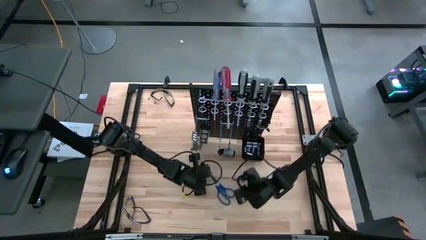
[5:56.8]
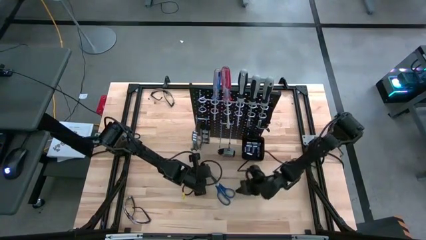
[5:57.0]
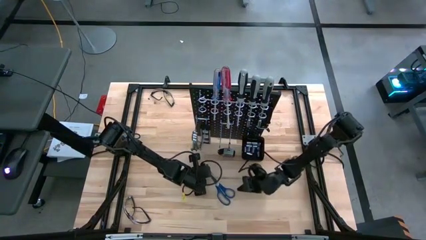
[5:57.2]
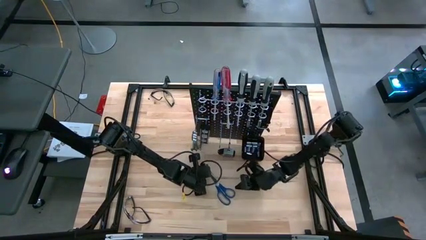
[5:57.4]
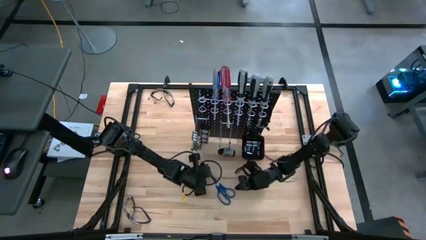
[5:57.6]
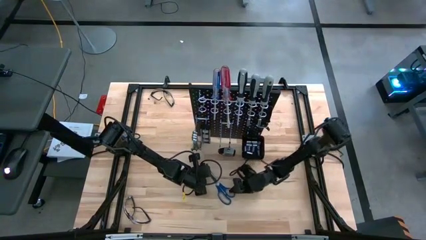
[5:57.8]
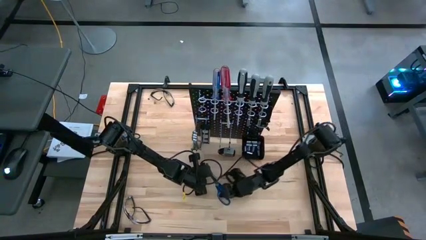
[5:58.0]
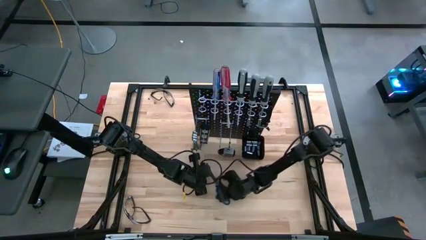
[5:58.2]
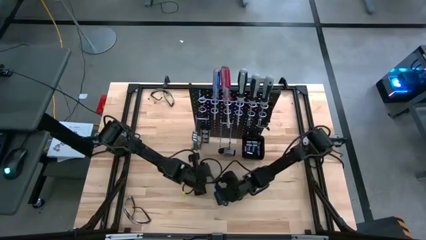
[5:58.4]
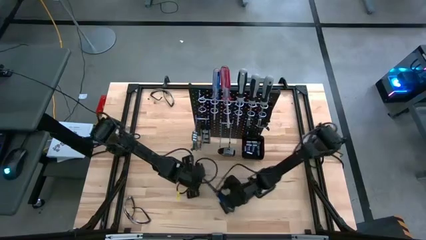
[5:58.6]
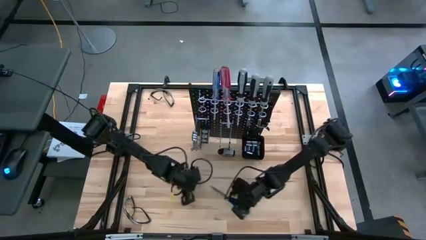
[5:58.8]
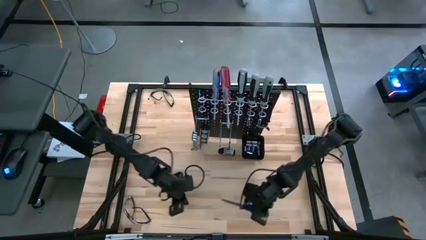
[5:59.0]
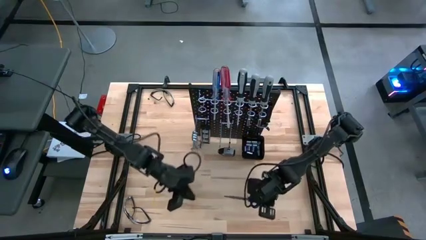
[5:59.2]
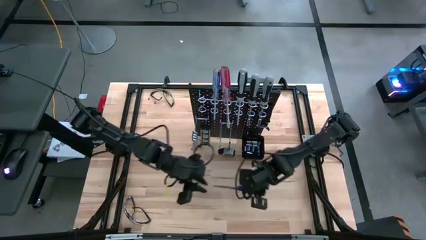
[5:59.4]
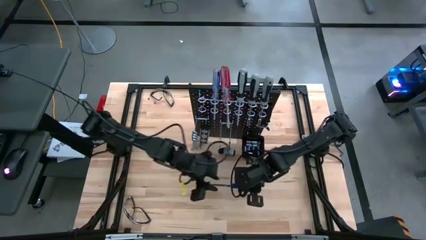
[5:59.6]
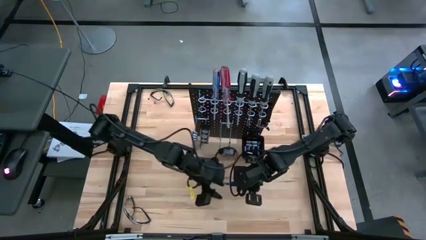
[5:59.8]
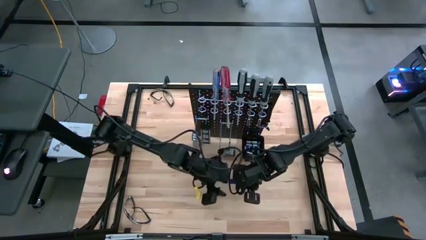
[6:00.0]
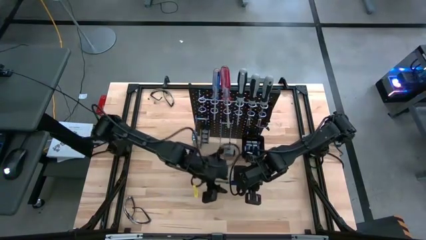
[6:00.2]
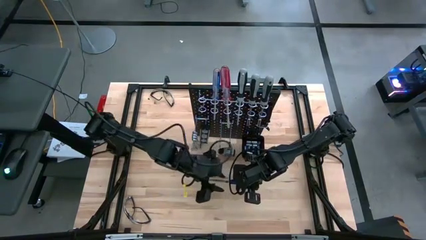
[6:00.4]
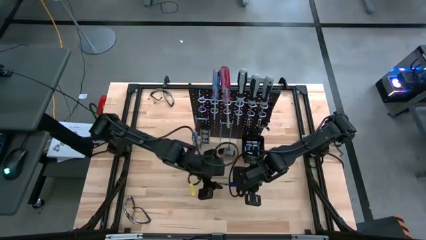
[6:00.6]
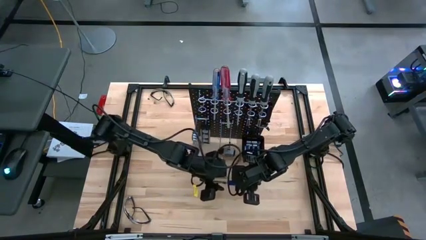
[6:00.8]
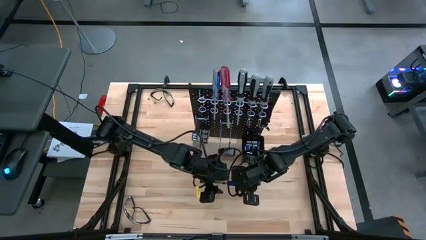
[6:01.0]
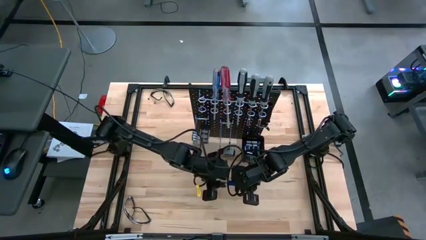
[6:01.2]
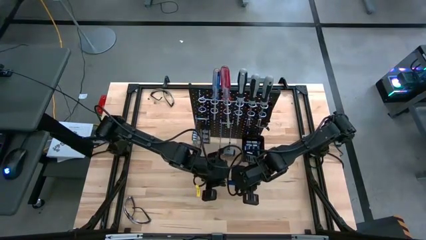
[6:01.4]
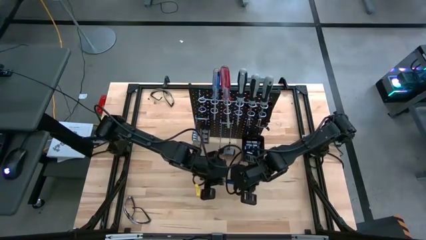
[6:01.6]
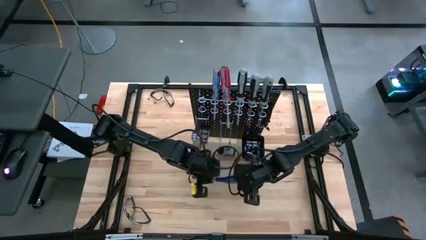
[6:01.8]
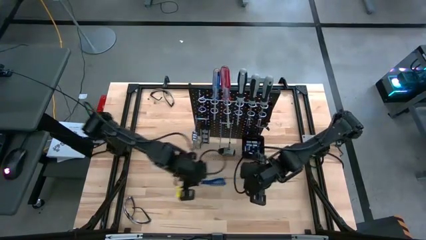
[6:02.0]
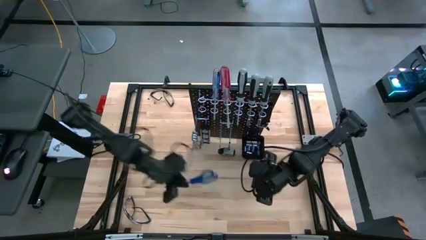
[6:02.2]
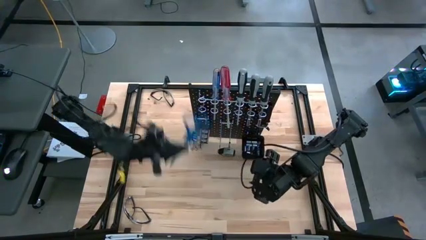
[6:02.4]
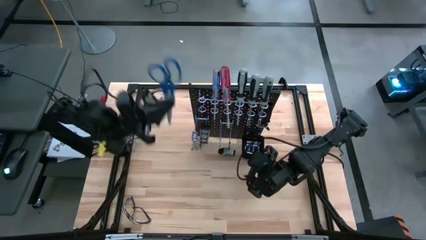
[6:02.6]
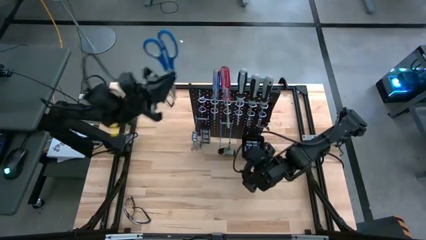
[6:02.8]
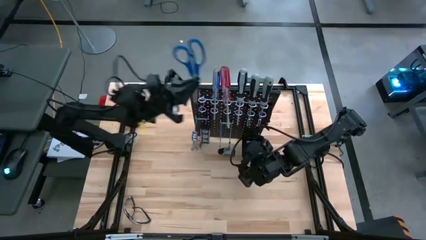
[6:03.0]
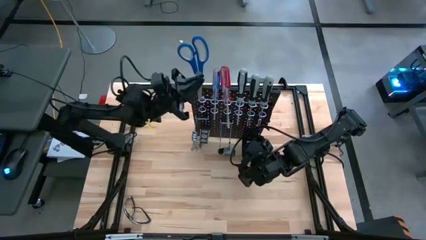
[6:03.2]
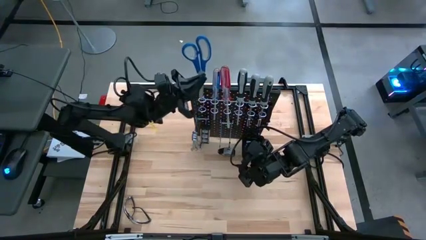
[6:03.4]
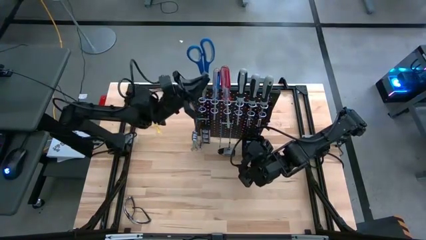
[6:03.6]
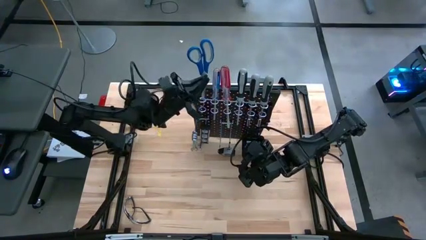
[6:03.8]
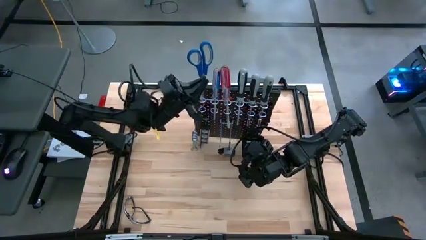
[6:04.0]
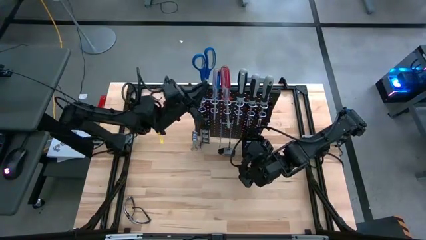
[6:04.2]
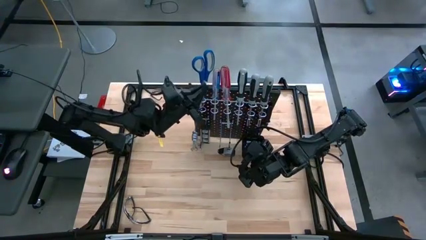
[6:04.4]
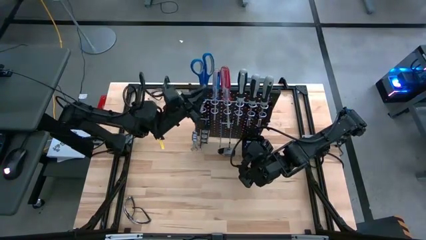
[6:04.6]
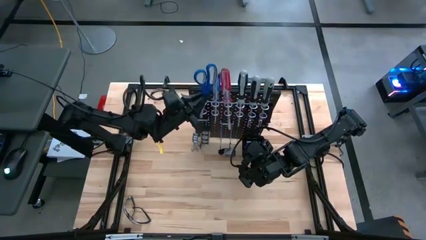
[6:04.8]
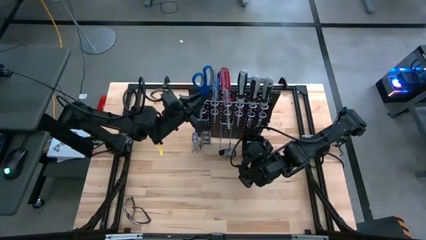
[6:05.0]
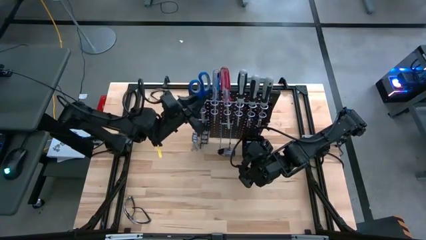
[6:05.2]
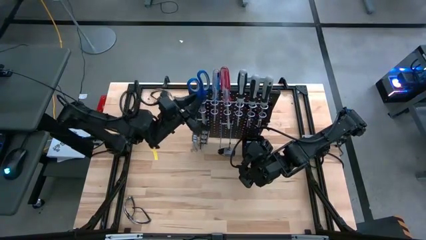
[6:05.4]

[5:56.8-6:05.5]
Task: Hang tools onto peg board
Hang the blue scissors on the pegboard

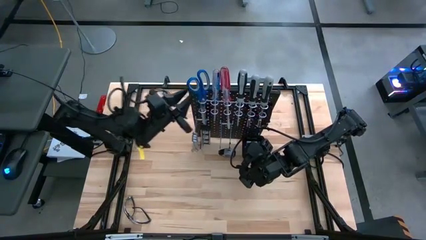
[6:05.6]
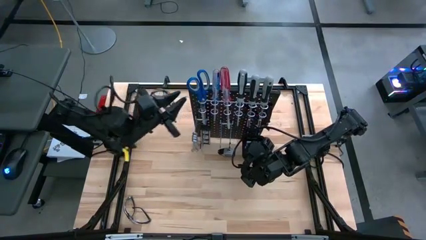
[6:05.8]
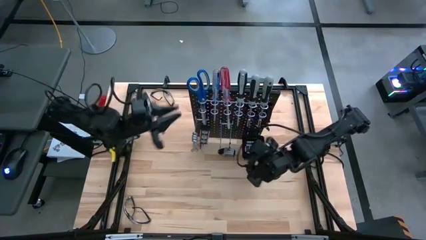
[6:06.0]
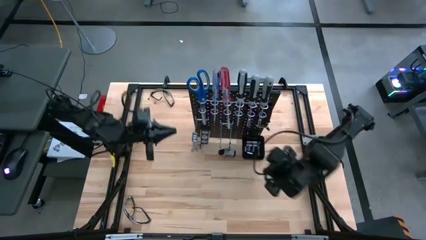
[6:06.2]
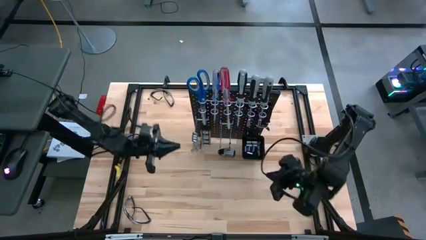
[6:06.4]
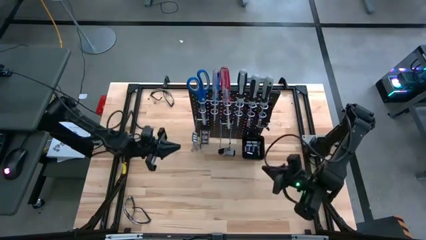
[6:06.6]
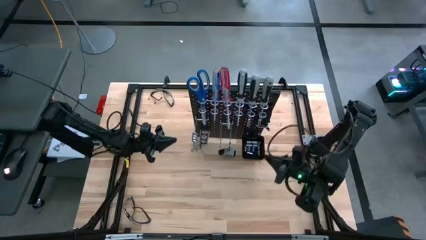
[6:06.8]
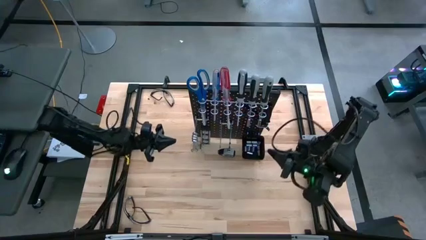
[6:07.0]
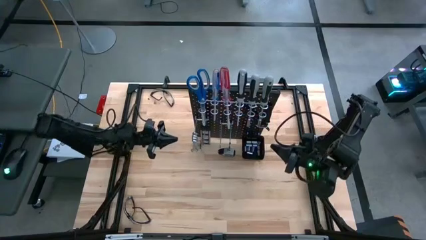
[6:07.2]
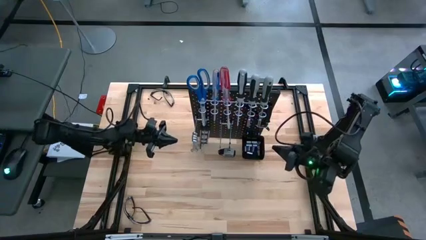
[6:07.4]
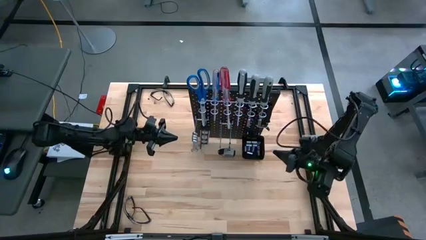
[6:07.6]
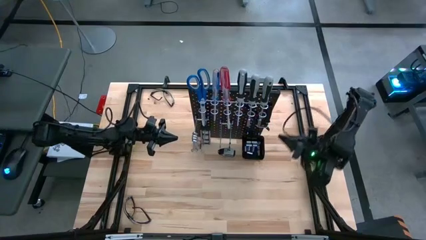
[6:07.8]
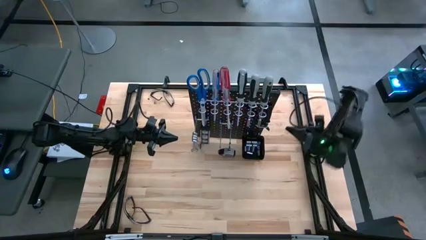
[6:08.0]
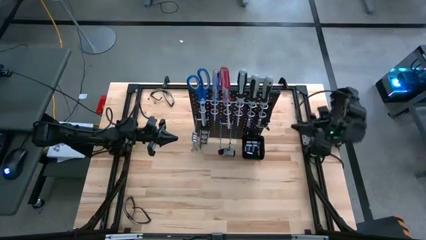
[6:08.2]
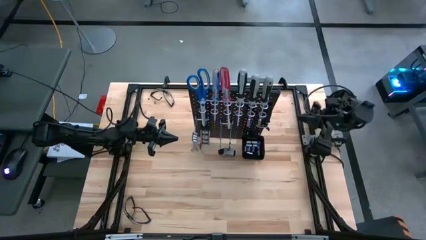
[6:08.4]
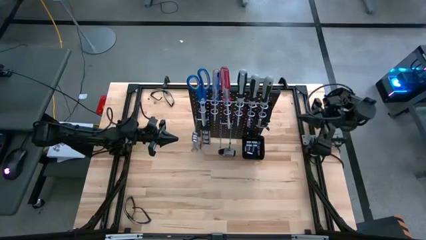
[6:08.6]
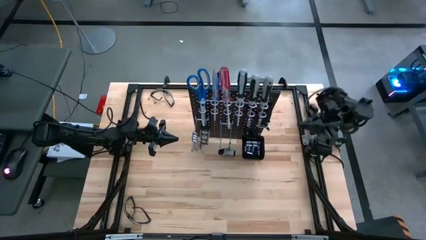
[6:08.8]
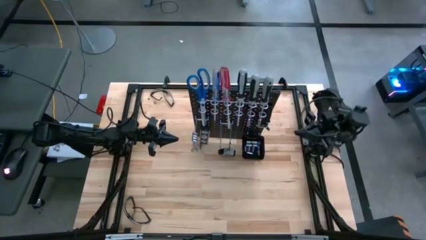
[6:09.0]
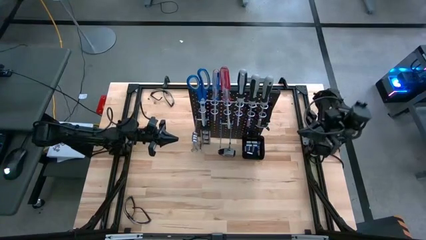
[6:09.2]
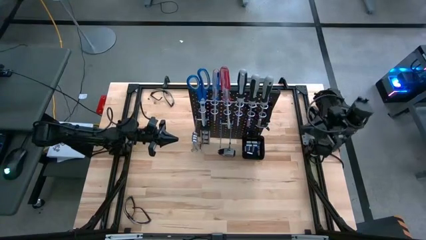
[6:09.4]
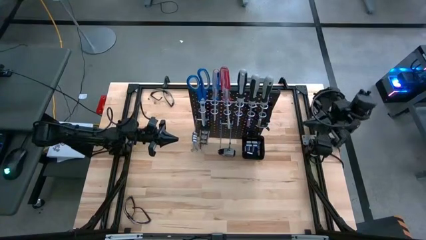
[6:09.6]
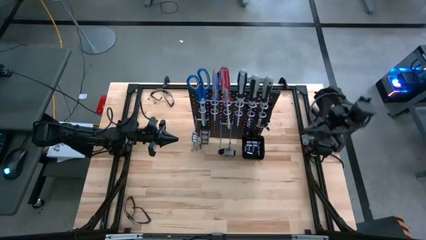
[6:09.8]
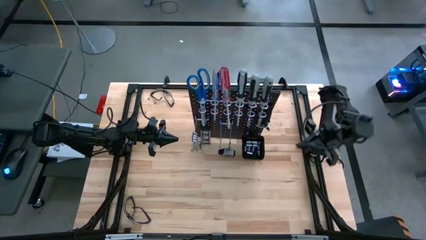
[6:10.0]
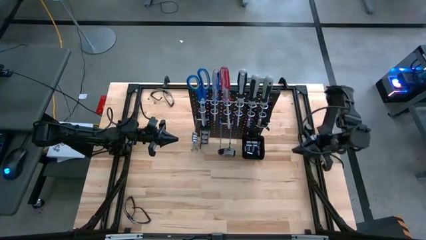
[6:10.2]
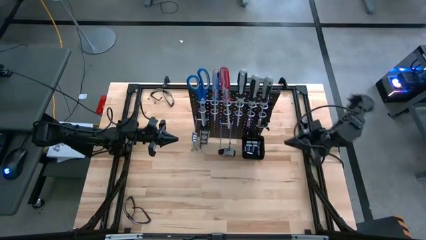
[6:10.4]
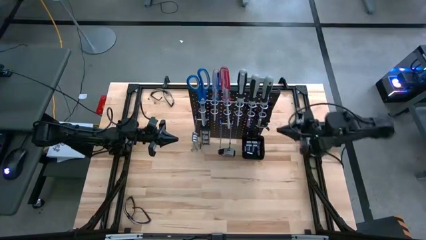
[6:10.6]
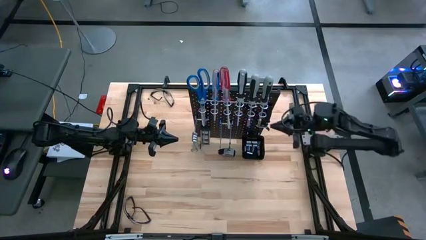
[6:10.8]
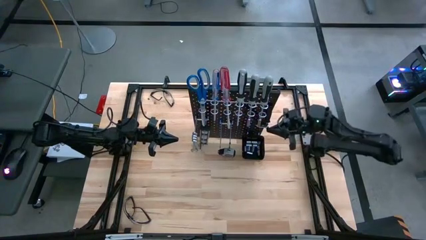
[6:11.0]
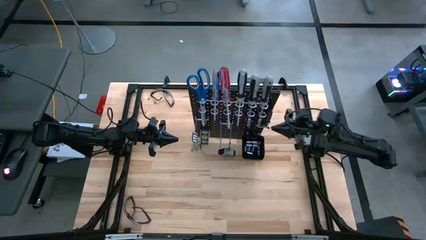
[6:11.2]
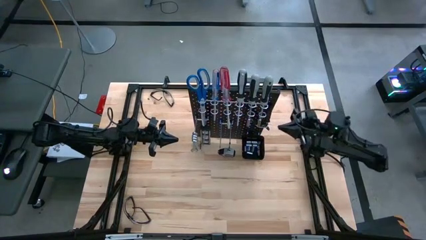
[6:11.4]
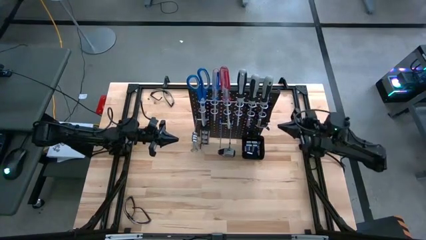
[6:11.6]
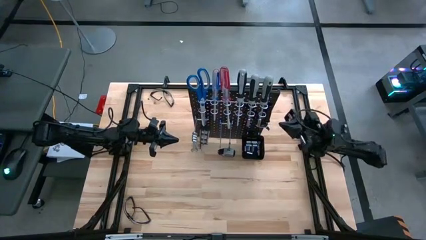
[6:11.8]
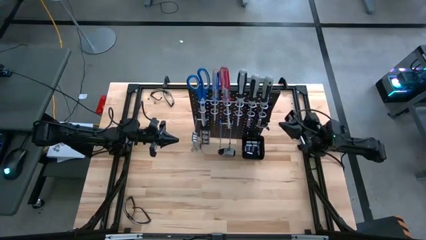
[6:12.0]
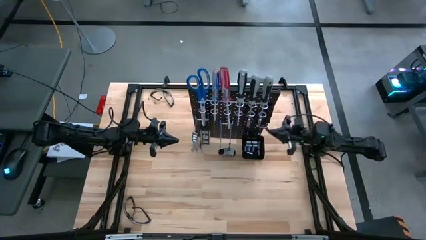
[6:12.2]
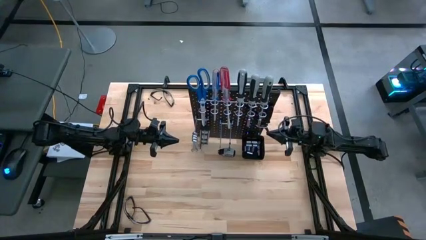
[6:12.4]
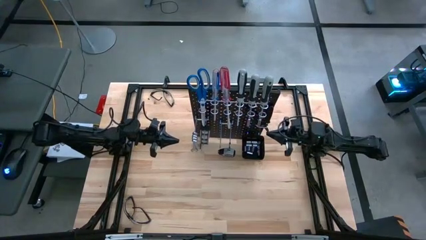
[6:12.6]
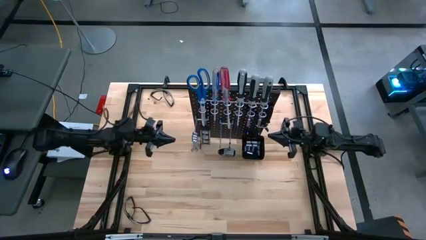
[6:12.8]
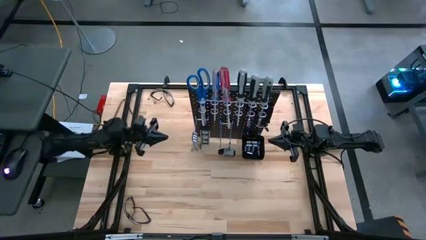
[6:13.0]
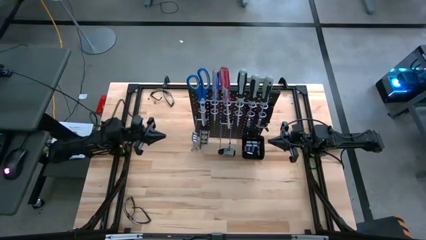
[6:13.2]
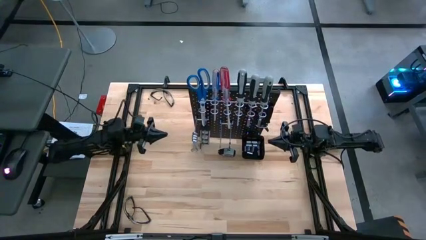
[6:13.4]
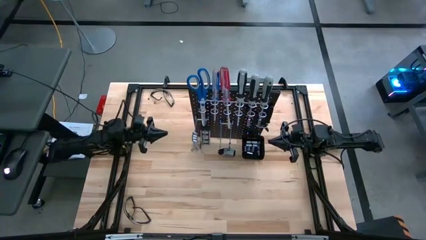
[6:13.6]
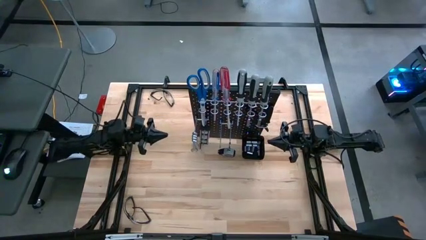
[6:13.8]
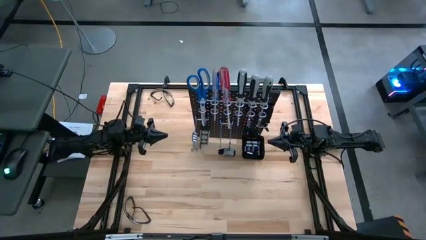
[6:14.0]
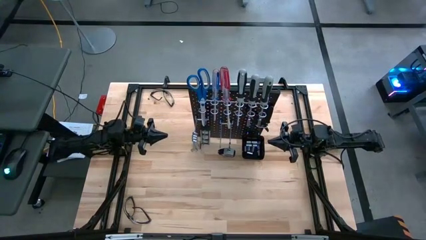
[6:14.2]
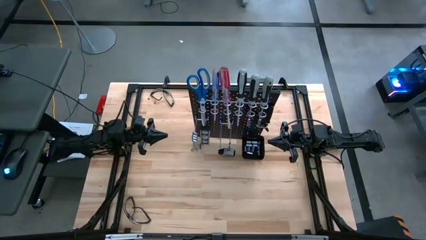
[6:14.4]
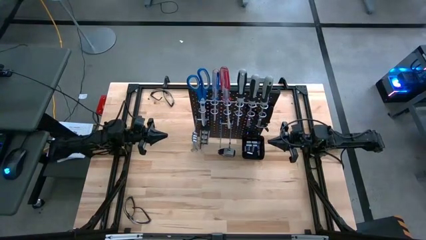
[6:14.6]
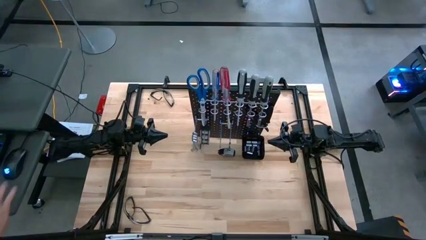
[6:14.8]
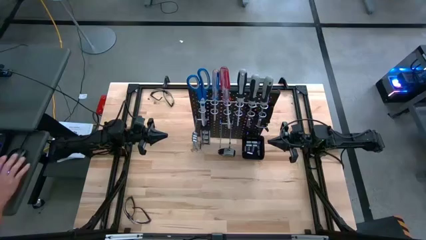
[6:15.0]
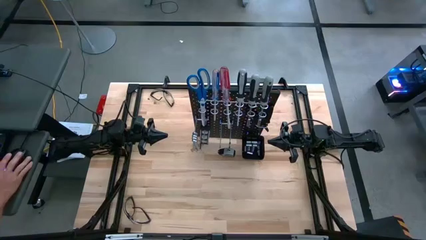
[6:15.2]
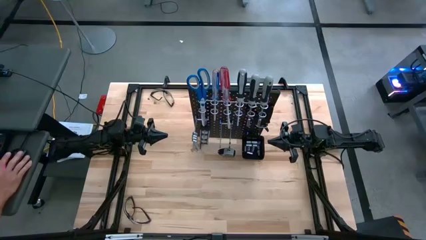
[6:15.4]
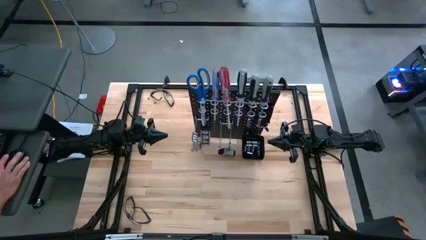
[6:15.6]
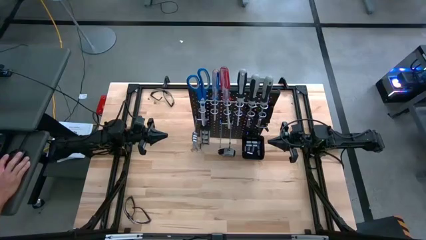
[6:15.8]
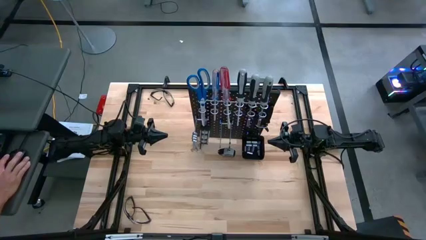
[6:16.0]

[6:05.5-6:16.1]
Return to Home Position
